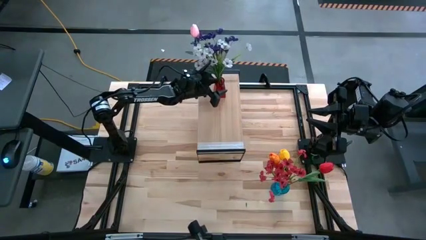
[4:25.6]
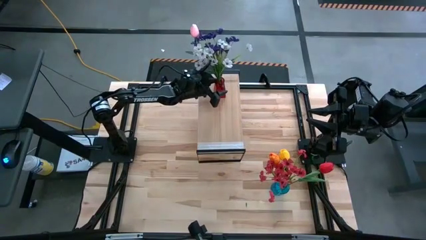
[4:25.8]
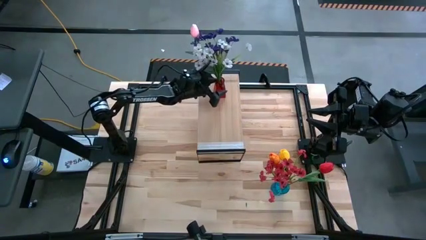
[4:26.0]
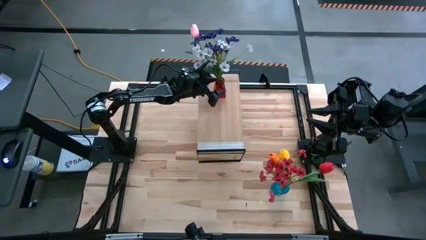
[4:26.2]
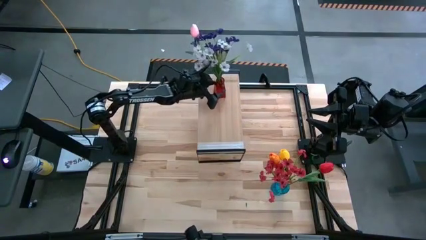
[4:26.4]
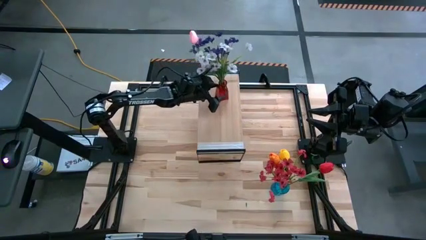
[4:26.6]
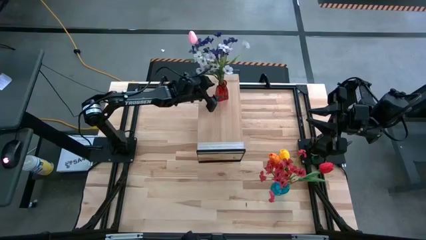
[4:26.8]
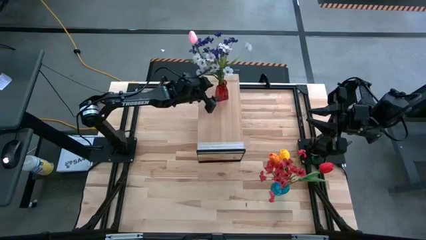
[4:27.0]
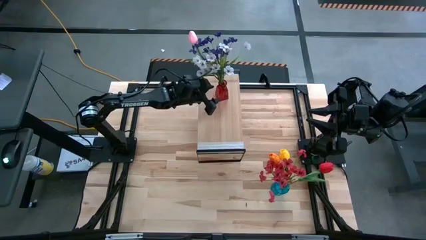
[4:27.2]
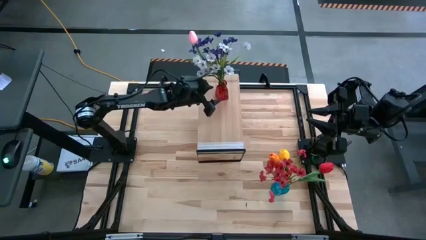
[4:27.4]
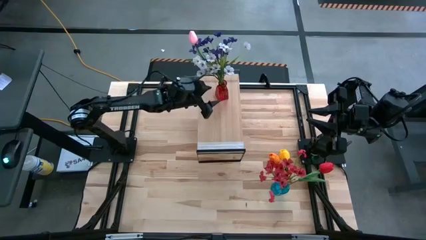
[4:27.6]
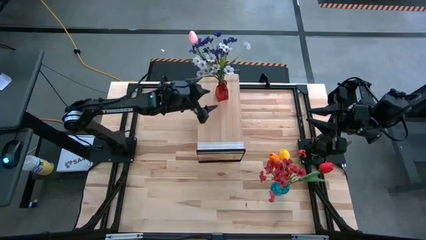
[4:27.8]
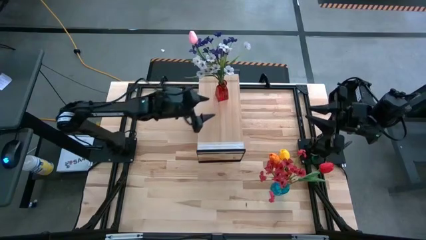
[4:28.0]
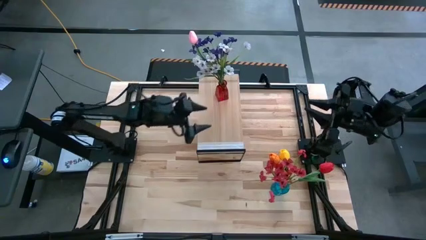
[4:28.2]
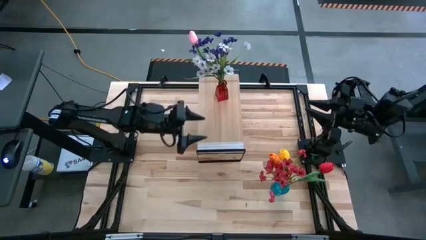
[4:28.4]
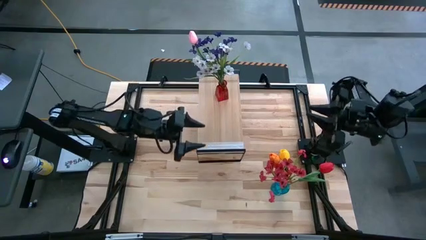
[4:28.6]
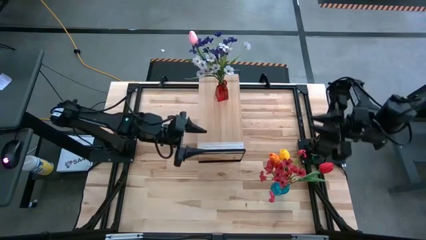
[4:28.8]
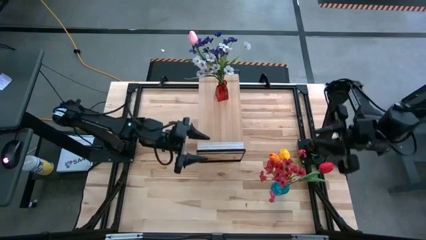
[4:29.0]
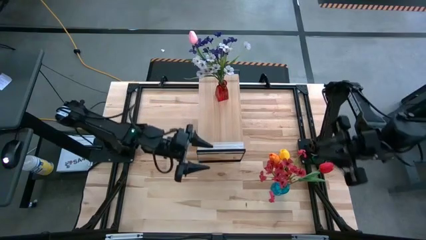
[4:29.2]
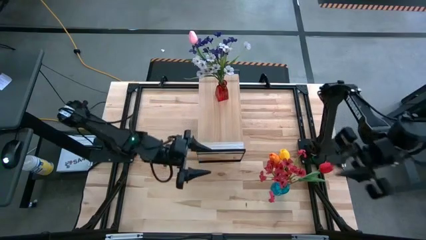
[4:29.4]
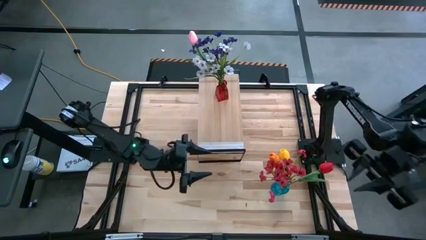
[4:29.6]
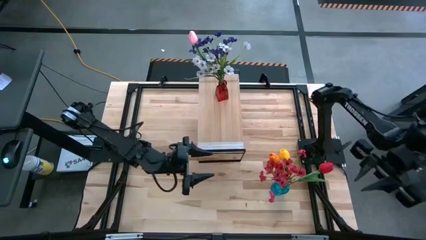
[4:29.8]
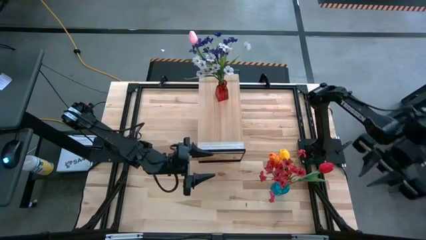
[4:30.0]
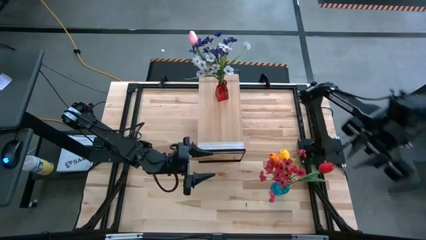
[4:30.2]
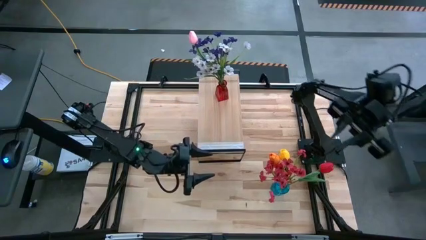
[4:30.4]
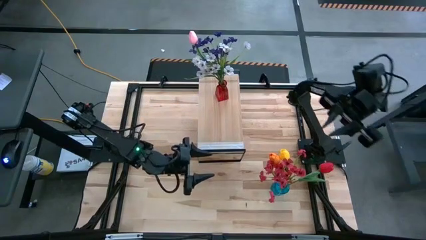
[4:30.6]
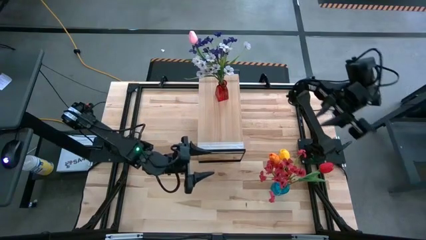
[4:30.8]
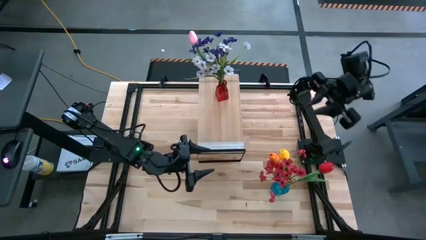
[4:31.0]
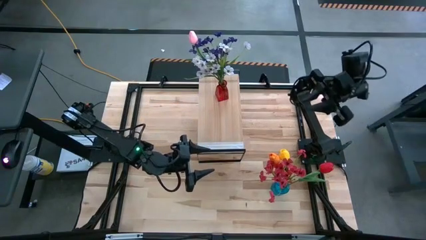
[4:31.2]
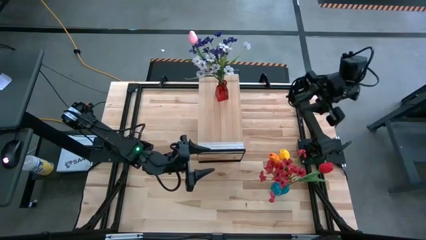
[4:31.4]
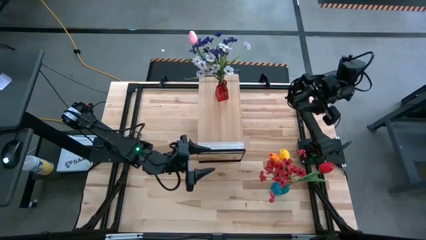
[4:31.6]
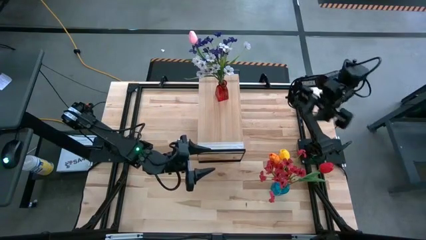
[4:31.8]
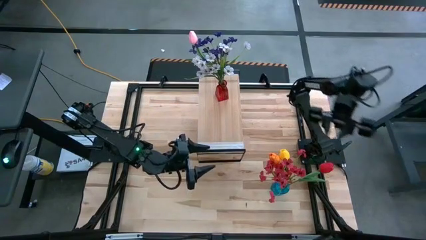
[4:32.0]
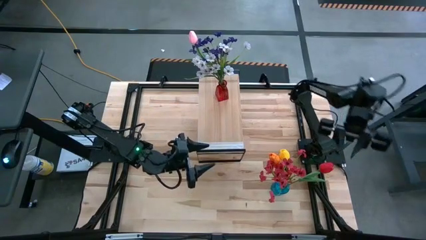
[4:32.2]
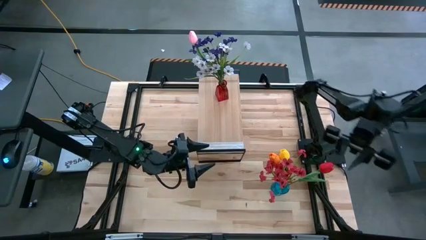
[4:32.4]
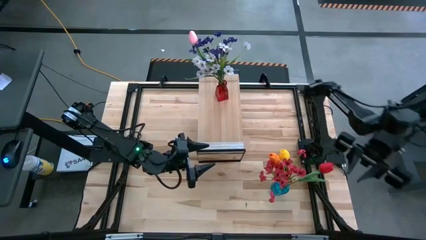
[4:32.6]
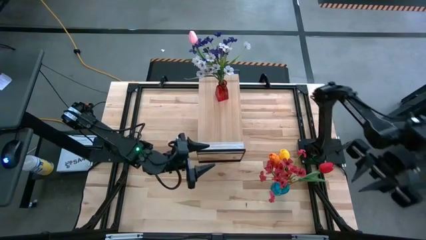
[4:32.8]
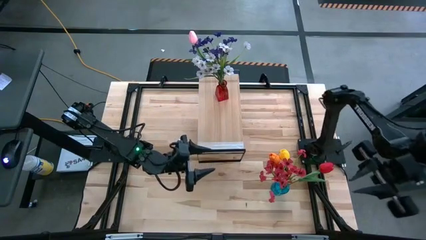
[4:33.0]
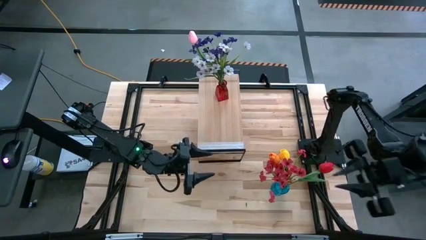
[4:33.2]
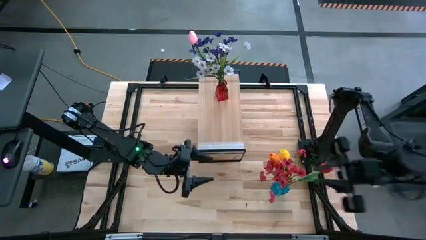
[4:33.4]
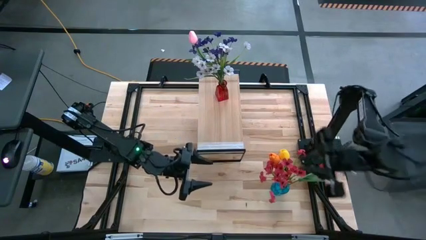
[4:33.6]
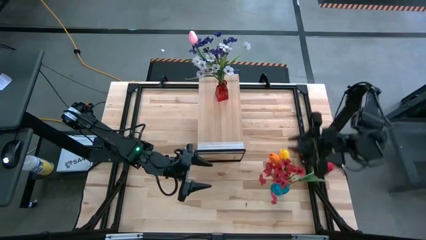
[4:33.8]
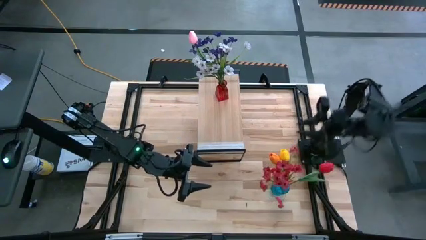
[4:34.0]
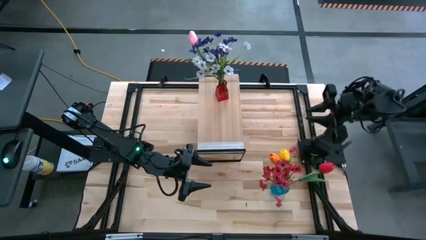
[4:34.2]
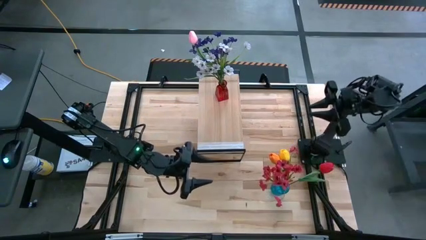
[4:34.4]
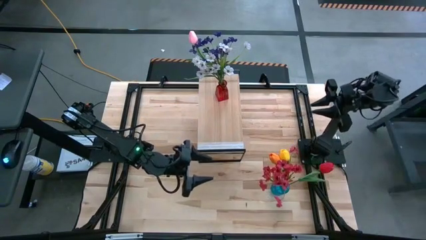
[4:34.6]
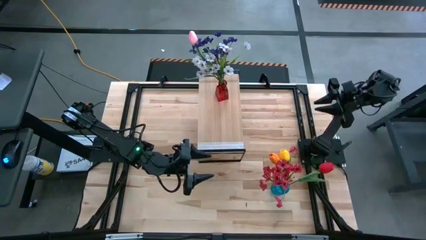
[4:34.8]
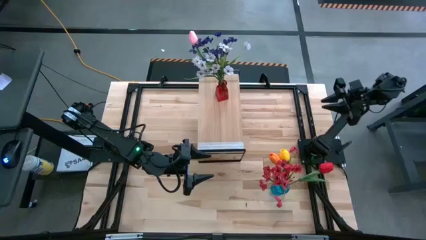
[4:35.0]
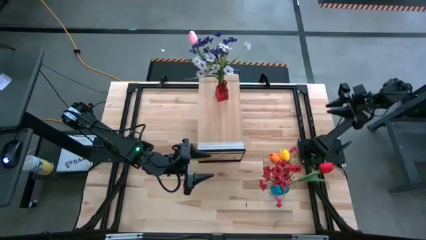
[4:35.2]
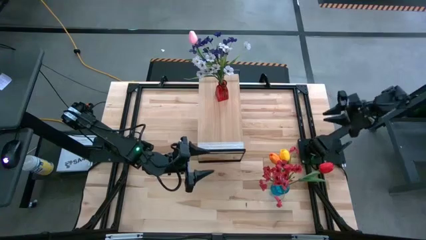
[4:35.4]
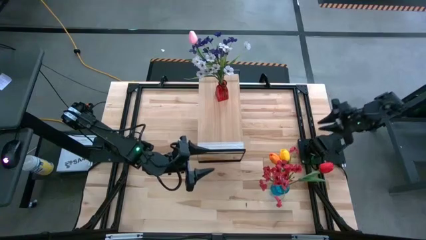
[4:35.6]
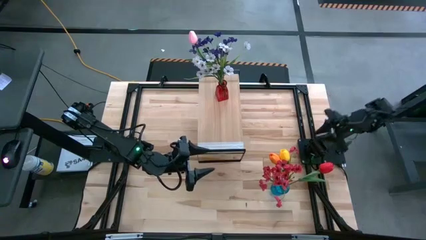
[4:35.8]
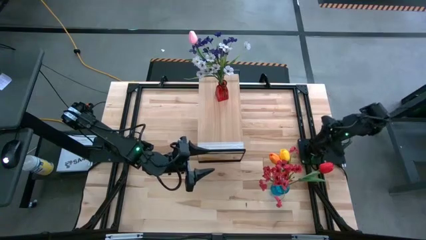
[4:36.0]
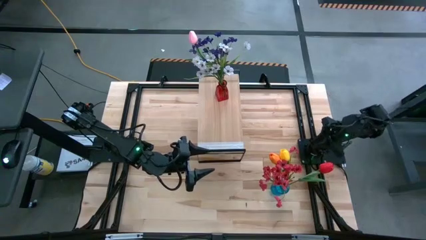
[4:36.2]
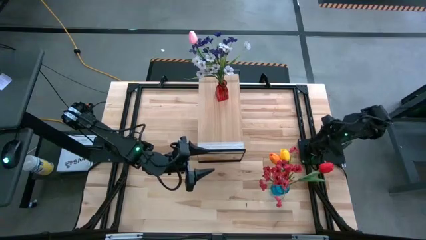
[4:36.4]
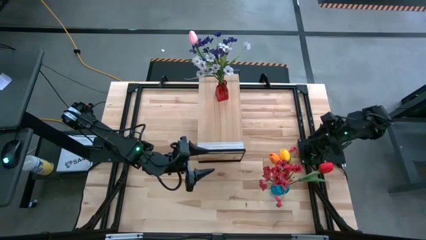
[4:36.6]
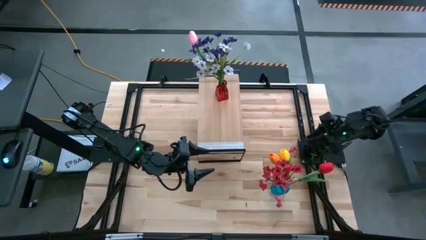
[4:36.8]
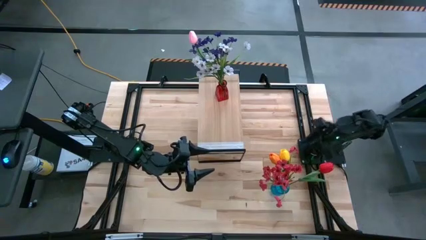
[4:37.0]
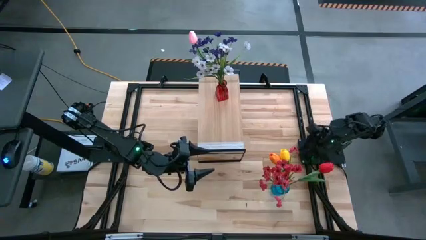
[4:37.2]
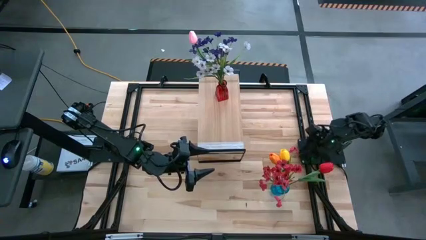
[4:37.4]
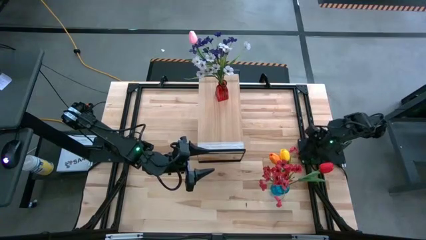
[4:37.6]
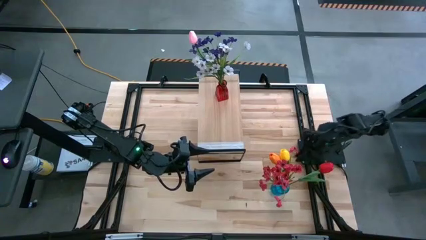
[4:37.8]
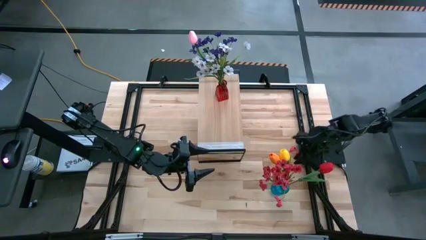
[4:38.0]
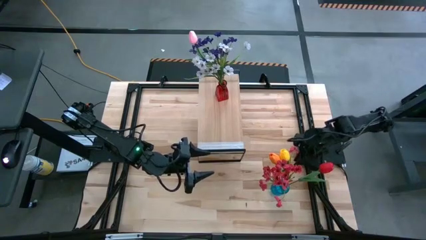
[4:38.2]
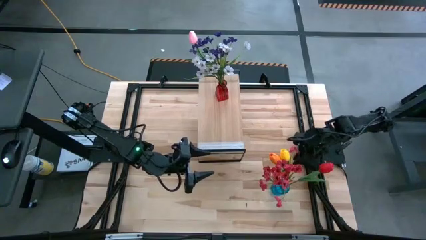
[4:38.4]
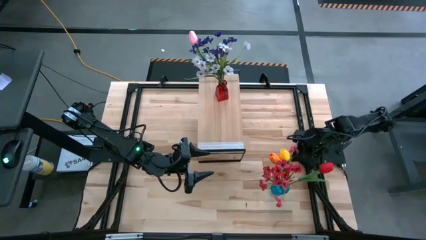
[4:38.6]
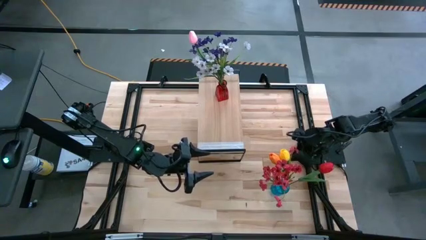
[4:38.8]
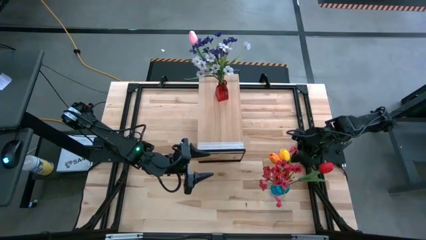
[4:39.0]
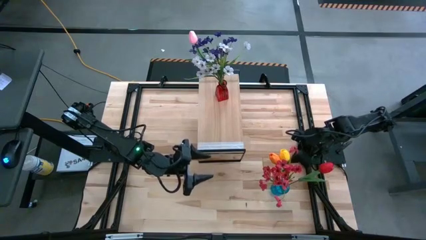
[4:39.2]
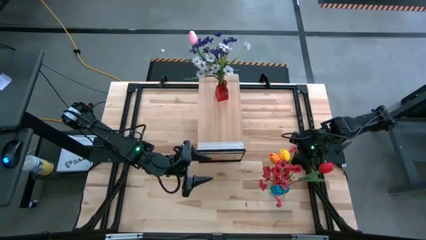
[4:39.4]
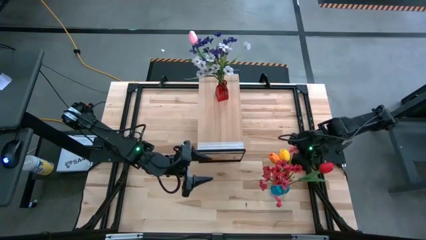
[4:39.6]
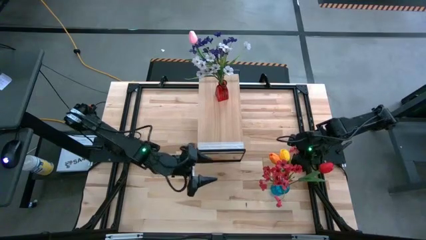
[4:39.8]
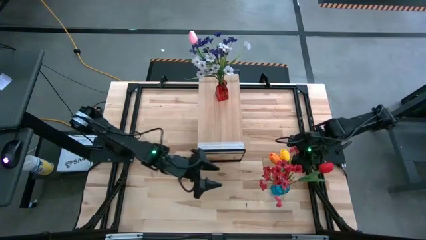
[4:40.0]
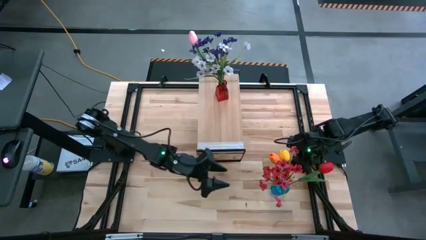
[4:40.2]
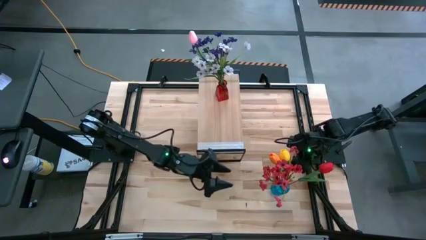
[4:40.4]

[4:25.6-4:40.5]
Task: Pick and place flowers into a vace then onto a shelf
Put the blue vase with flowers on the shelf
